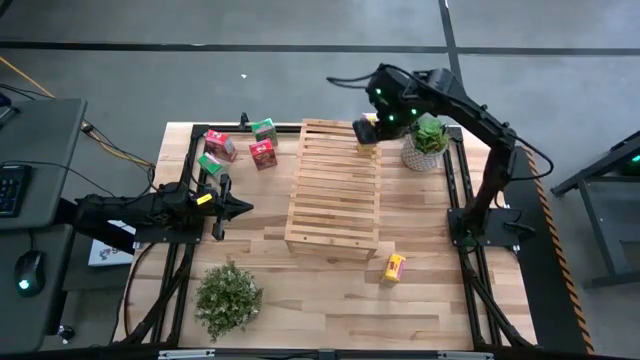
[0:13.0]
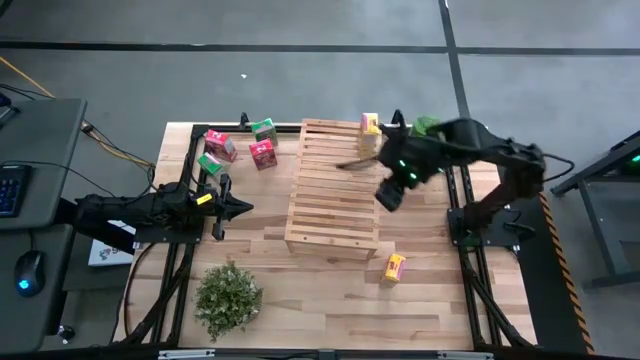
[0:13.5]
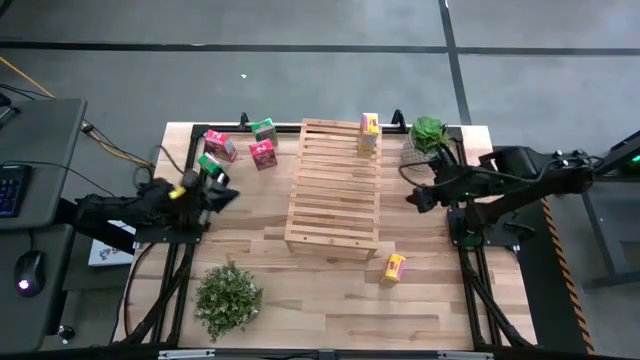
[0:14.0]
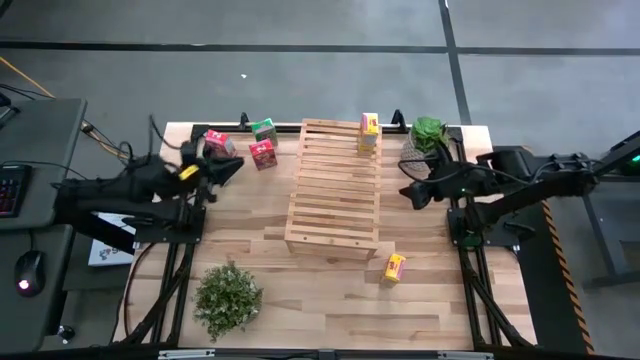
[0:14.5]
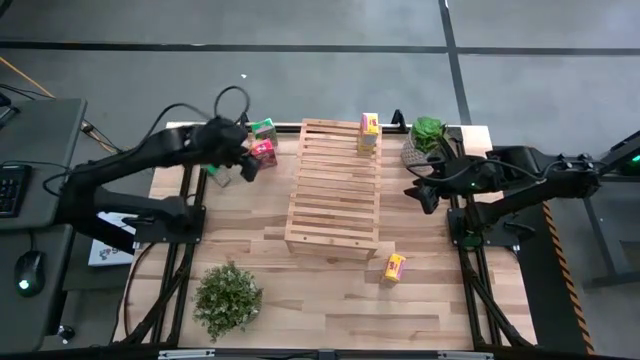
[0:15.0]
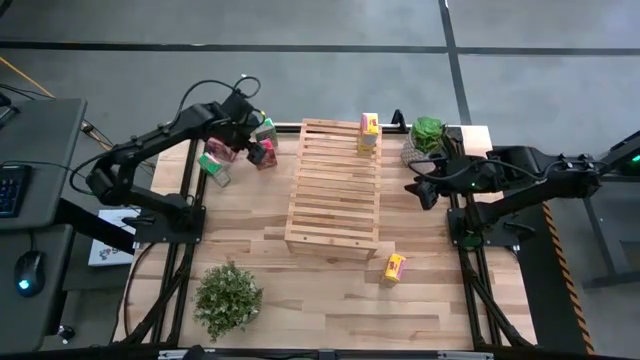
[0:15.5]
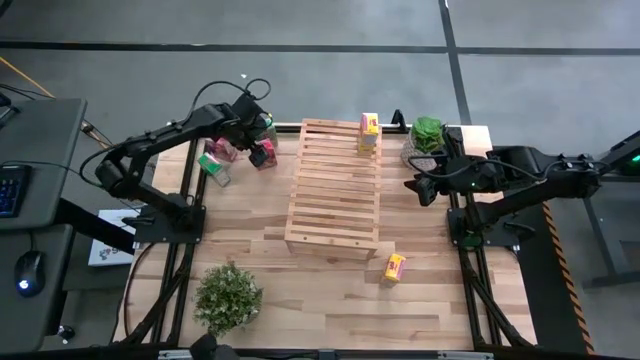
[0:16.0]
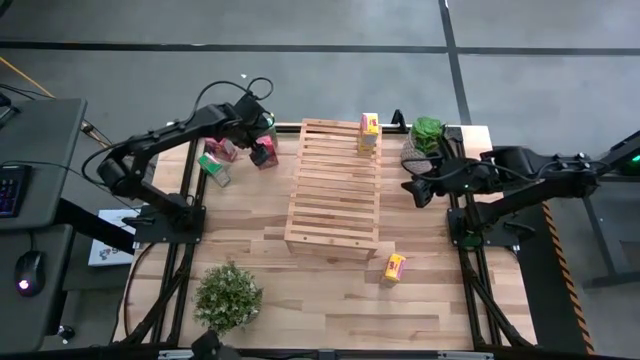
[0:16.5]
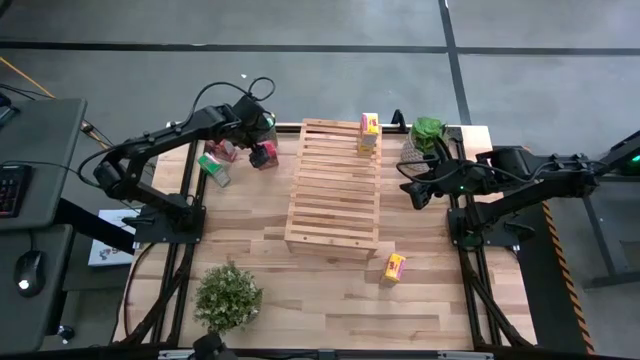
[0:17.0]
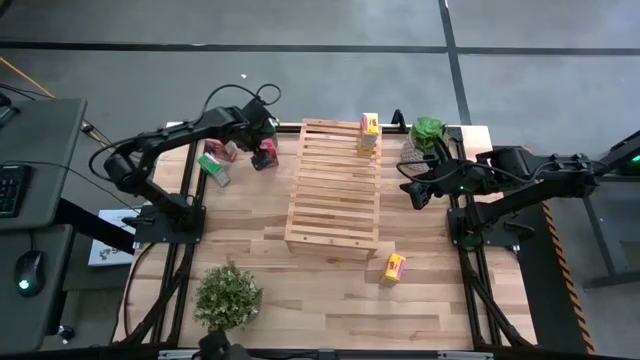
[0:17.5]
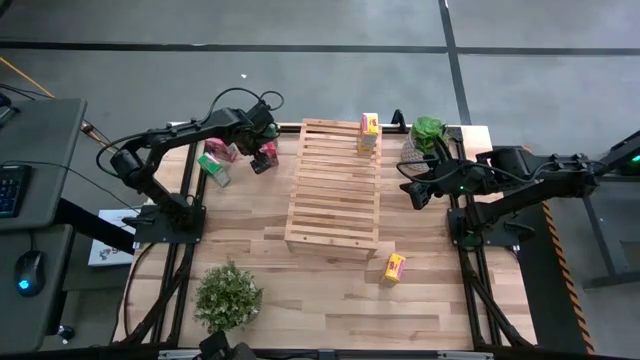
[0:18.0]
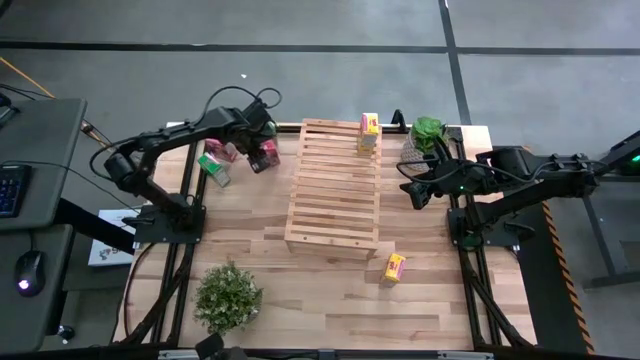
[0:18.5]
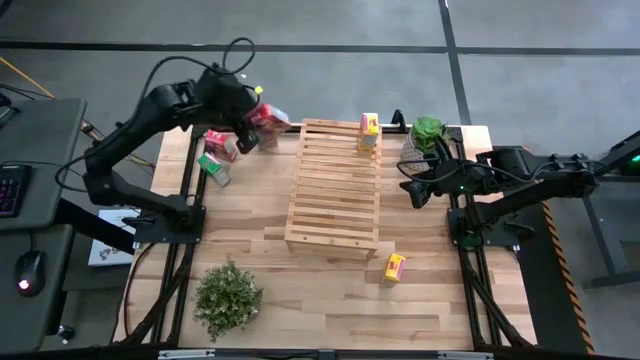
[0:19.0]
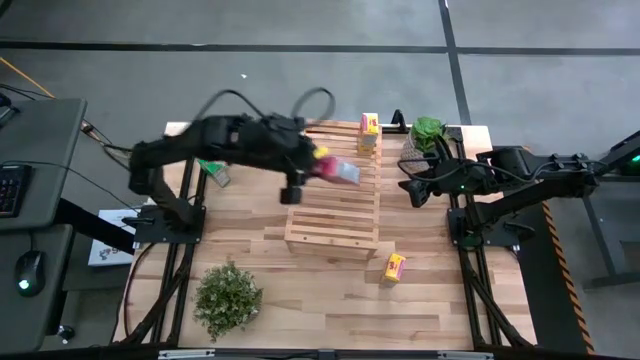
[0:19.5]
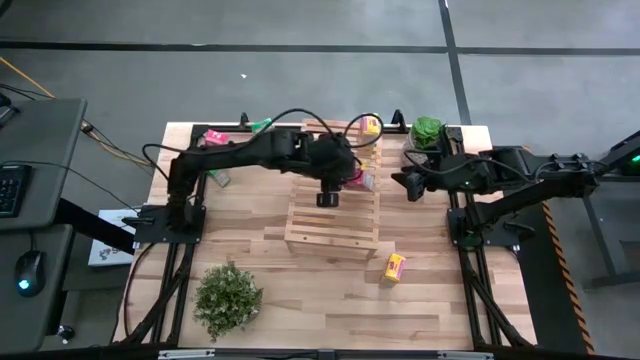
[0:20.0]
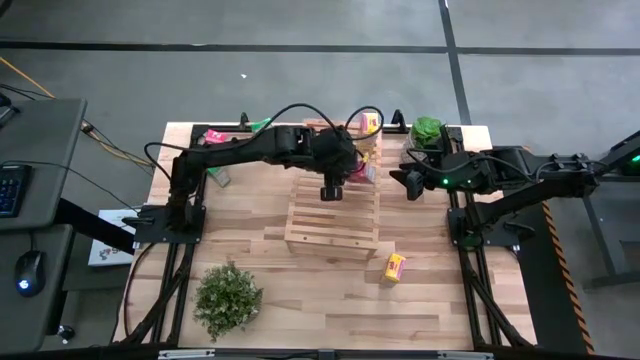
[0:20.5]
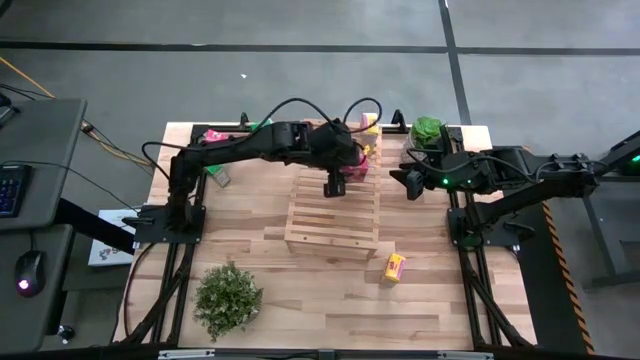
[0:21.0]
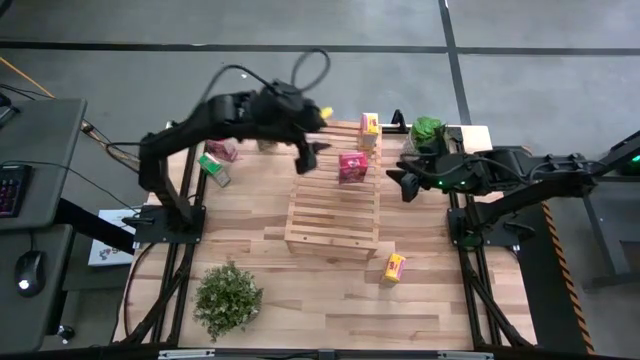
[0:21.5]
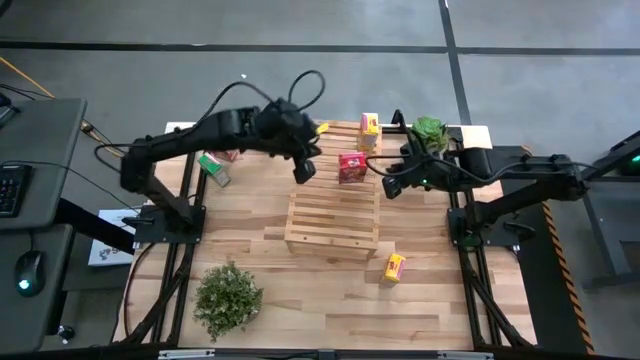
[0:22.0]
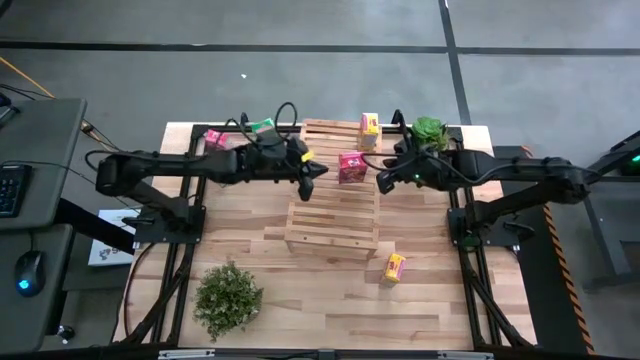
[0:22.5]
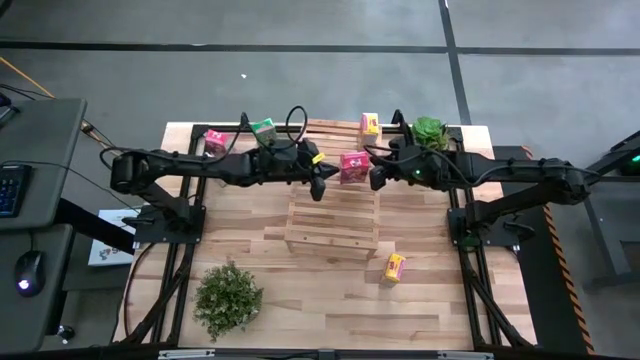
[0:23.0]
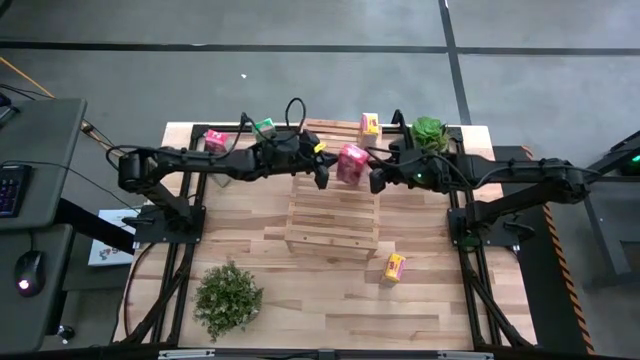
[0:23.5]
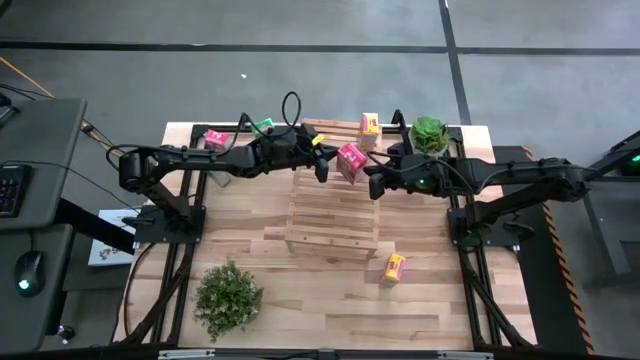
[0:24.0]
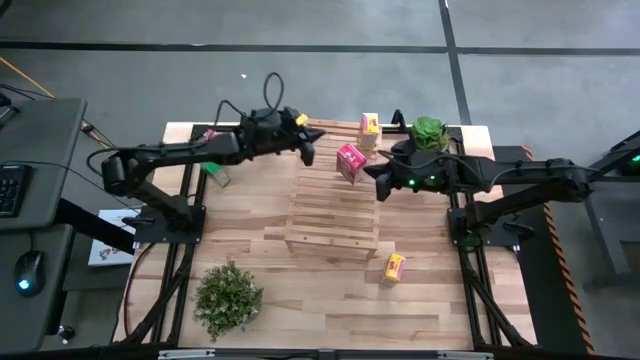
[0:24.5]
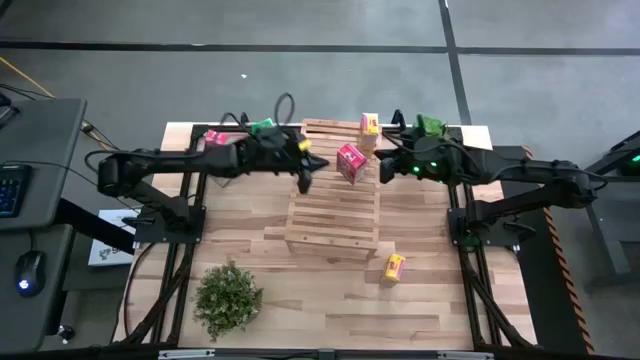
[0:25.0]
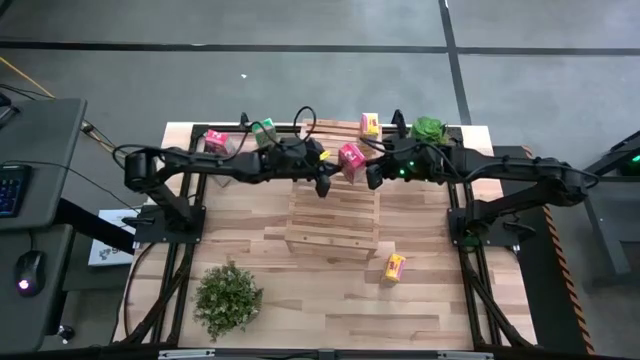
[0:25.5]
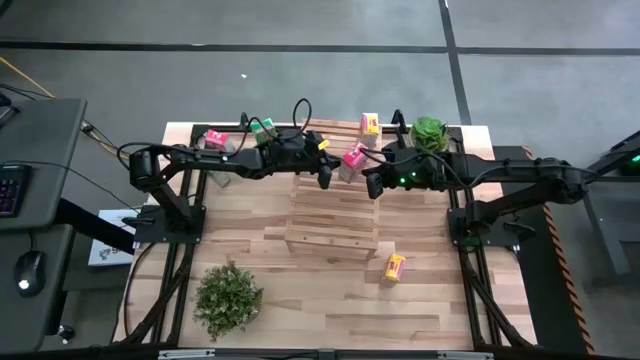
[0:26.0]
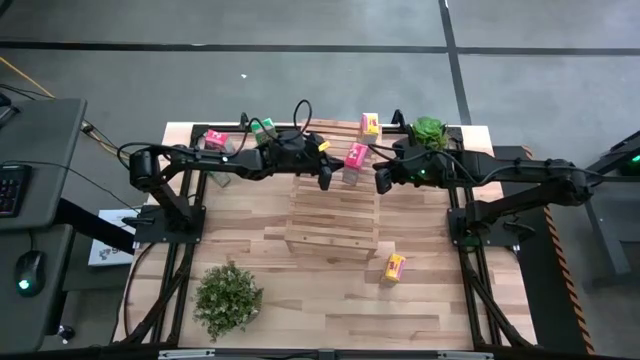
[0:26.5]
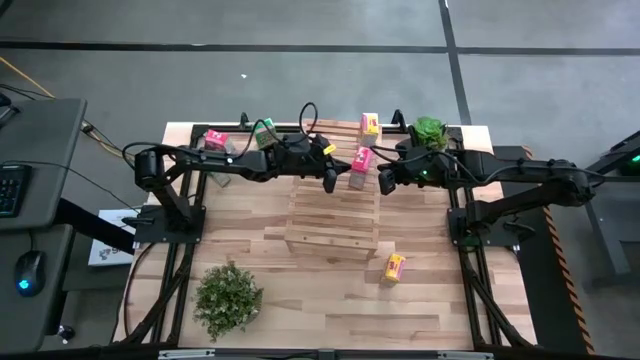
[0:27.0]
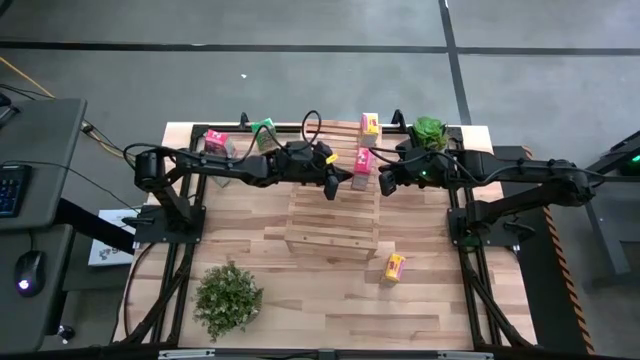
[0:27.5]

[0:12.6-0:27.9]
Task: Stack cereal on shelf
Put the right red cereal box on the shelf

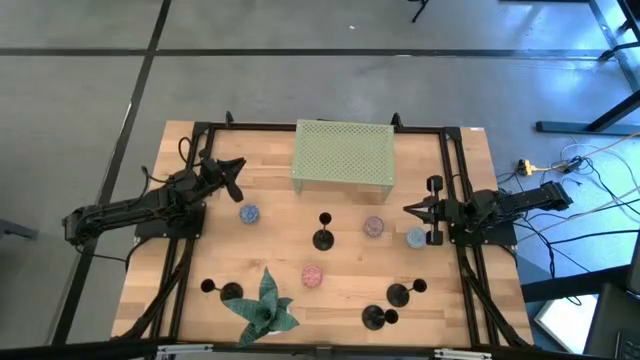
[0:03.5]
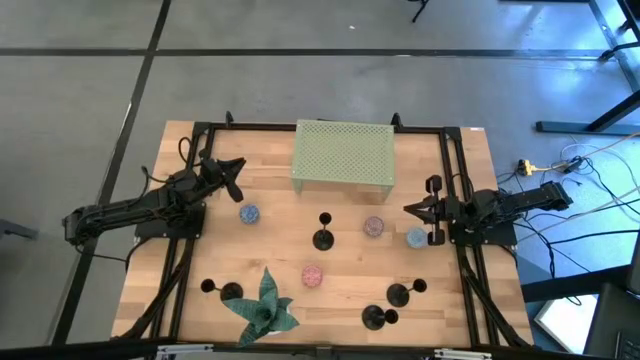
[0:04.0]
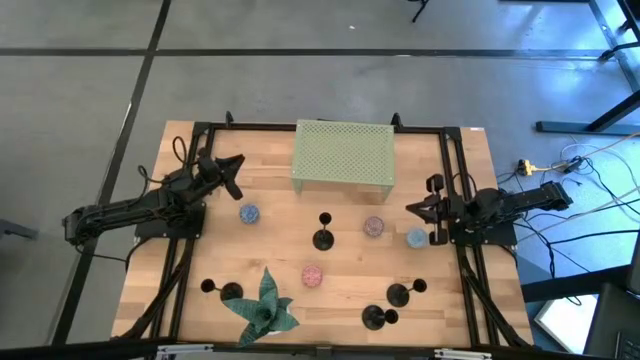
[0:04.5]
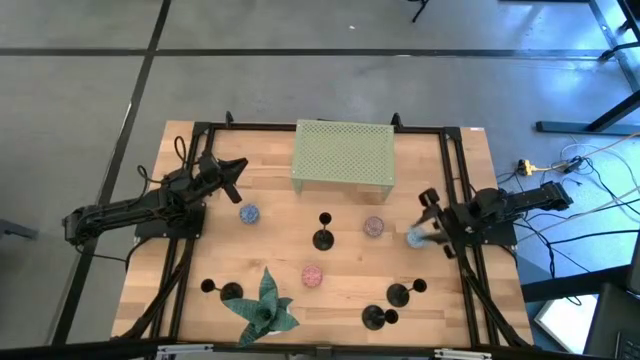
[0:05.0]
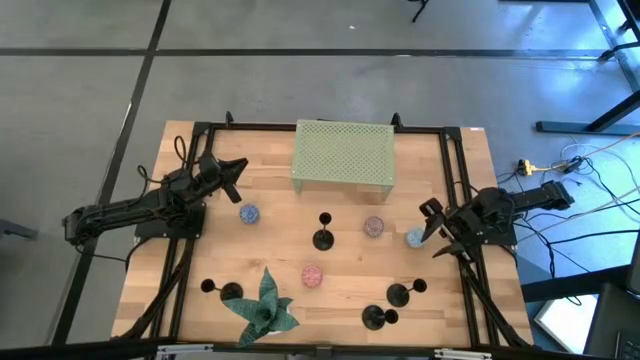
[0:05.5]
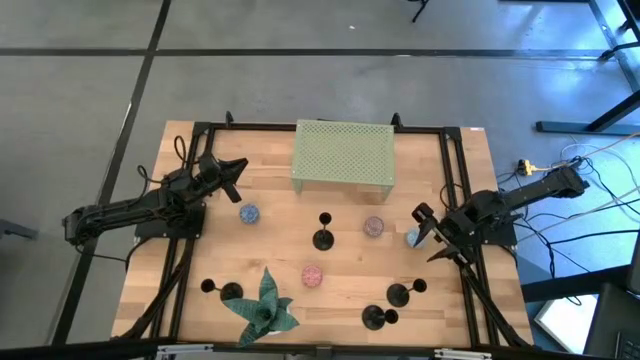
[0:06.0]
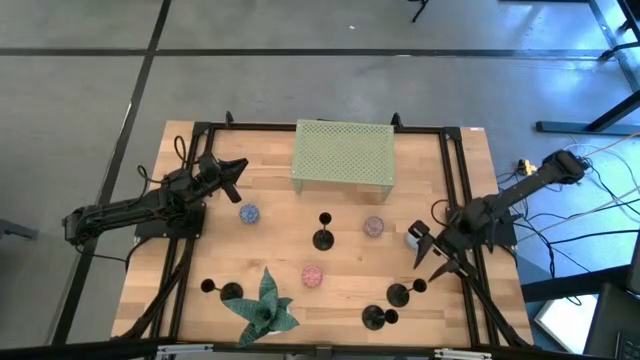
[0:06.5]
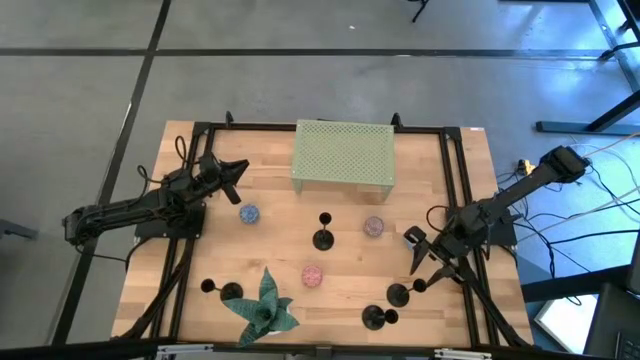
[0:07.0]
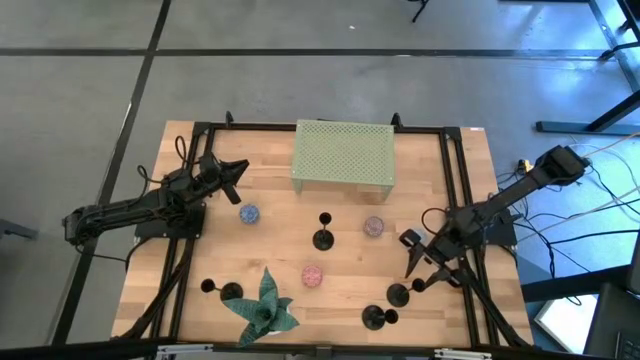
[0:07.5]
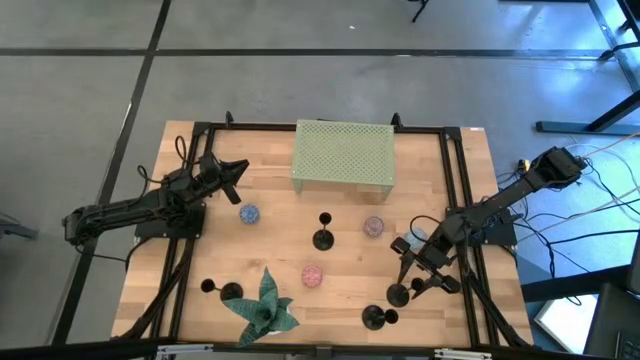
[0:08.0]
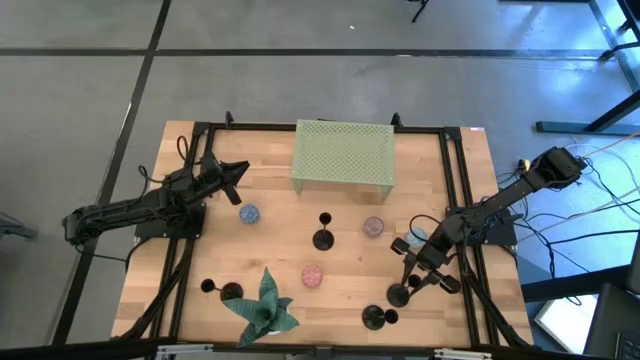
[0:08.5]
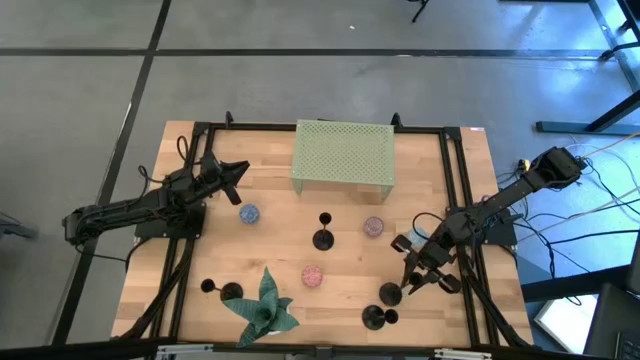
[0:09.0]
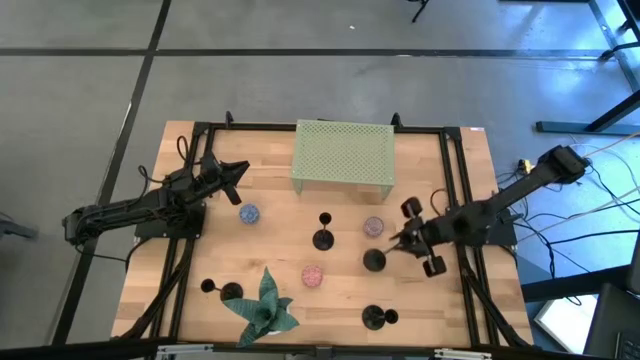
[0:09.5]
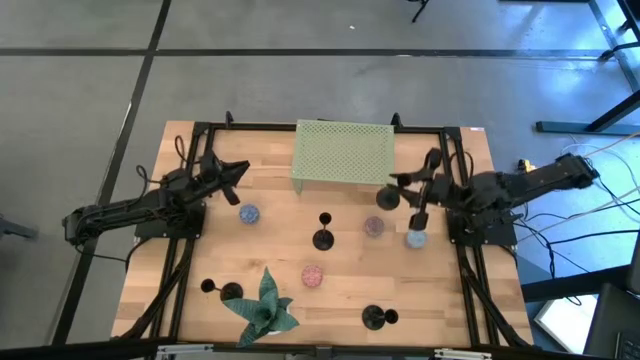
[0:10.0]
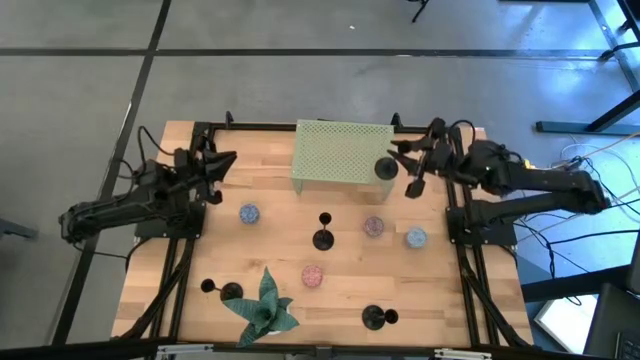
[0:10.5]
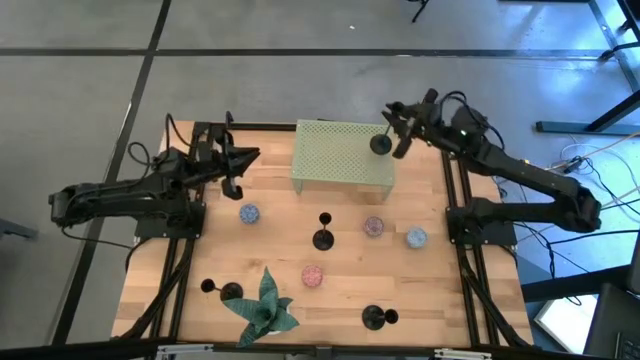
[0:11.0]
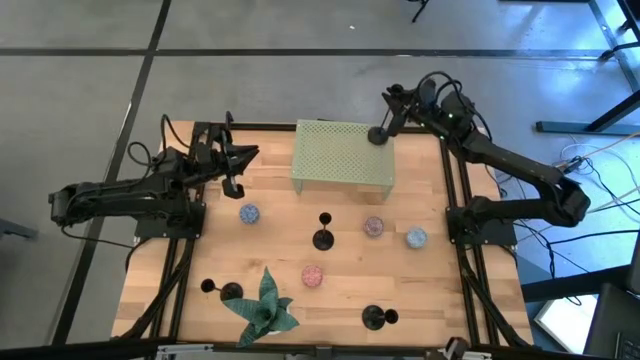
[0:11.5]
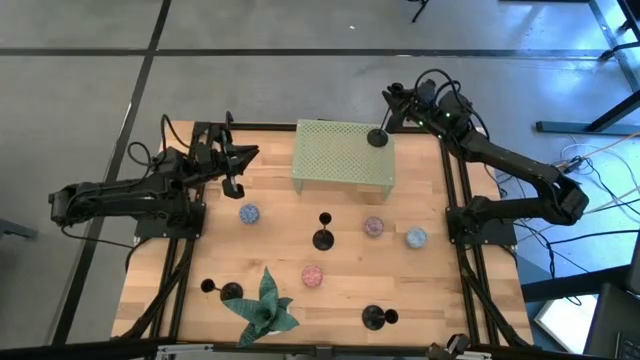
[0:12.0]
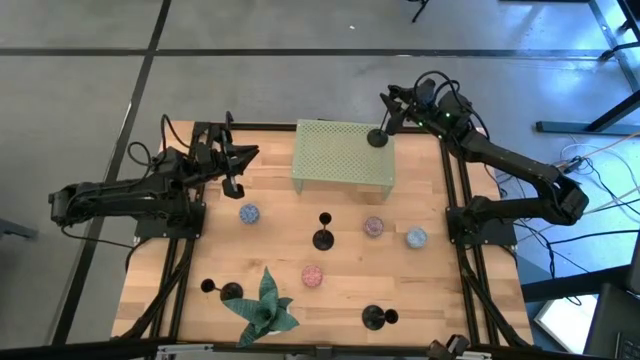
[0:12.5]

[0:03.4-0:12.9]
Task: Pick & Place candle stick holders
Put the black candle holder on the shelf
